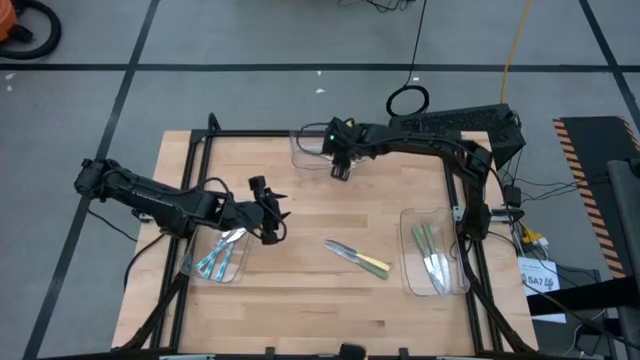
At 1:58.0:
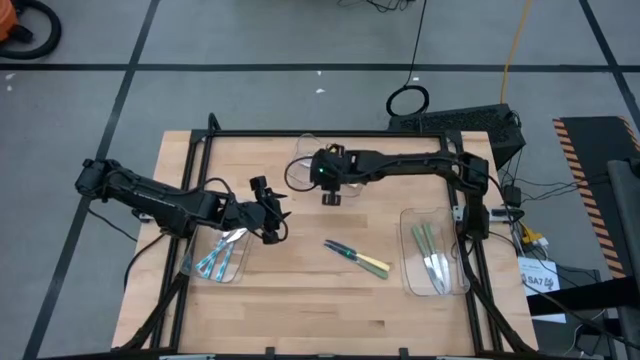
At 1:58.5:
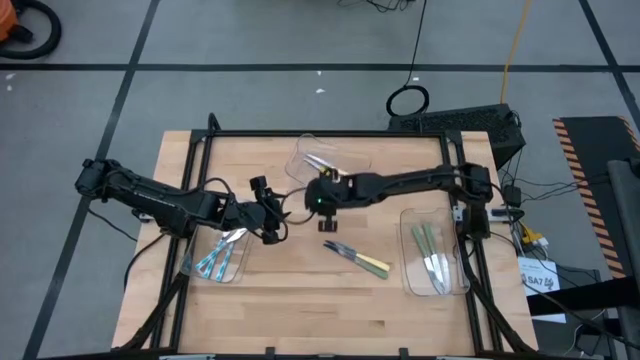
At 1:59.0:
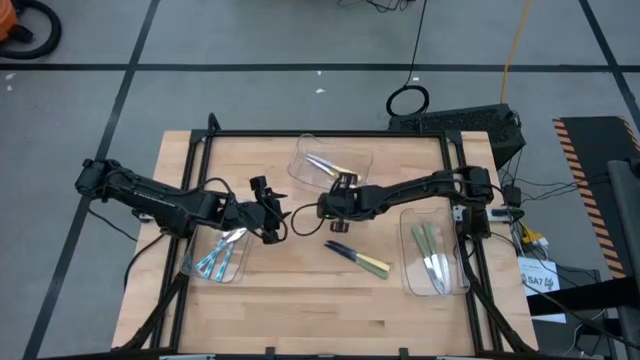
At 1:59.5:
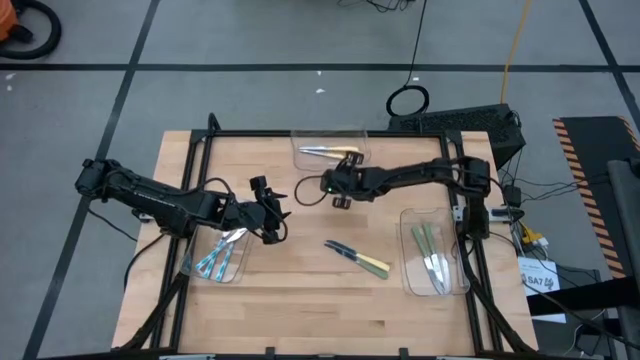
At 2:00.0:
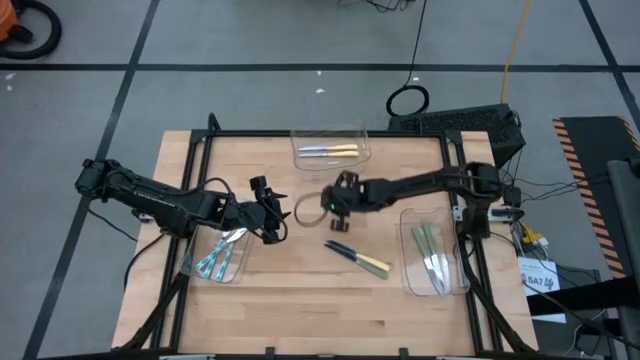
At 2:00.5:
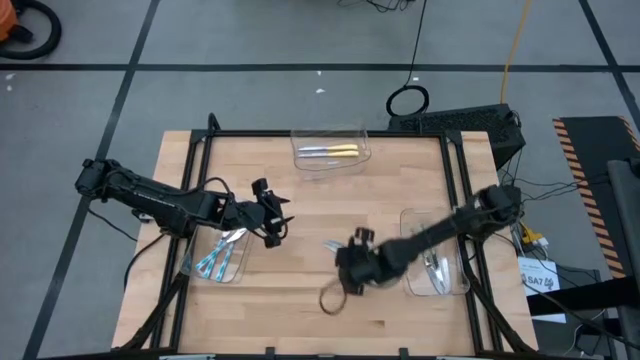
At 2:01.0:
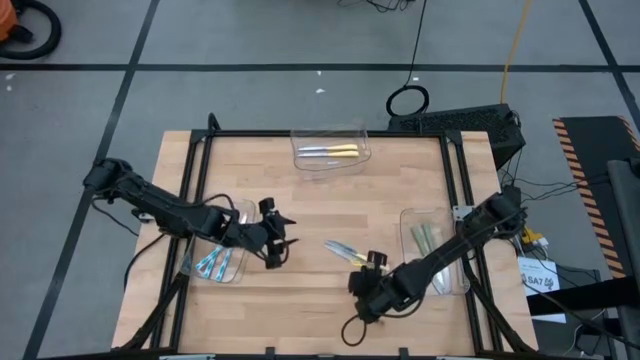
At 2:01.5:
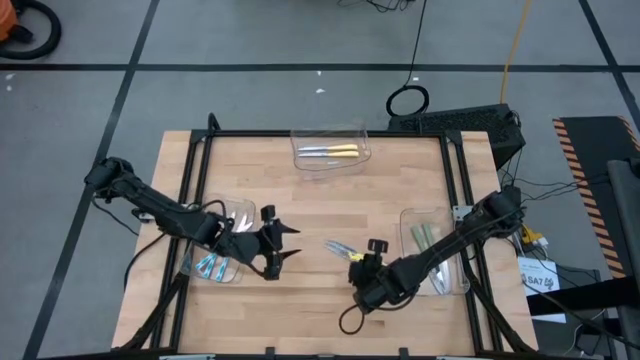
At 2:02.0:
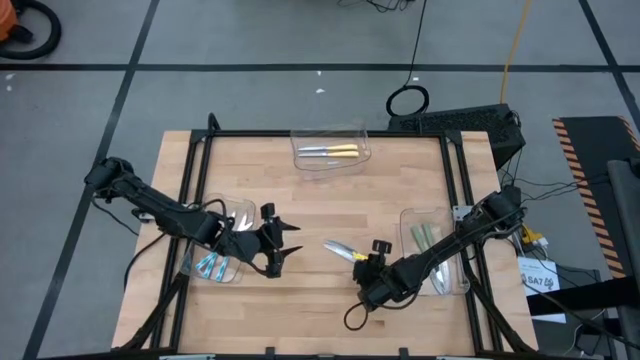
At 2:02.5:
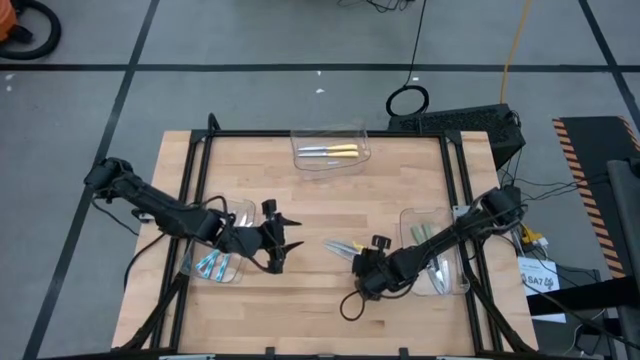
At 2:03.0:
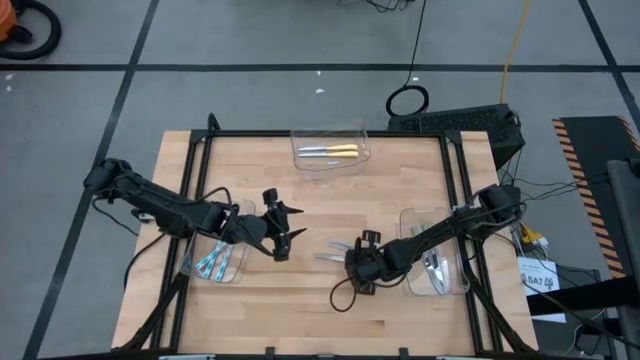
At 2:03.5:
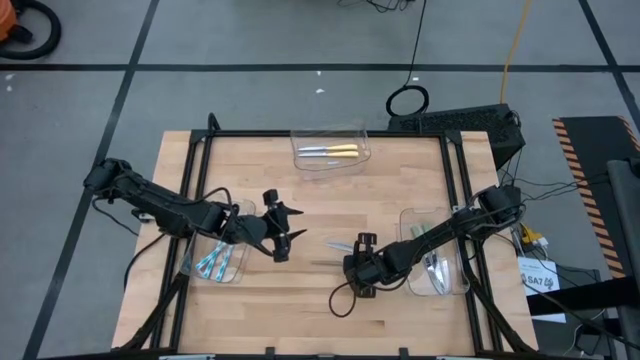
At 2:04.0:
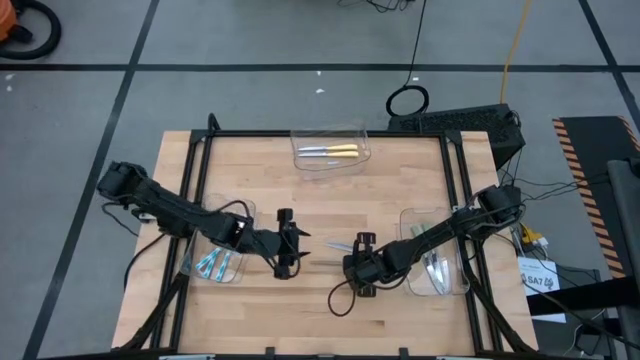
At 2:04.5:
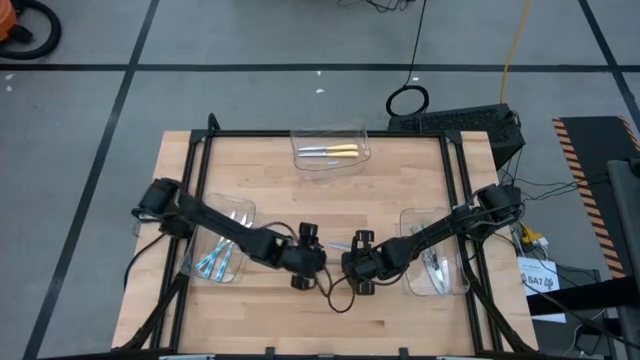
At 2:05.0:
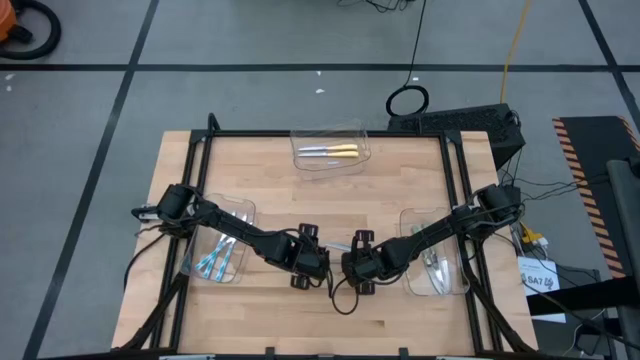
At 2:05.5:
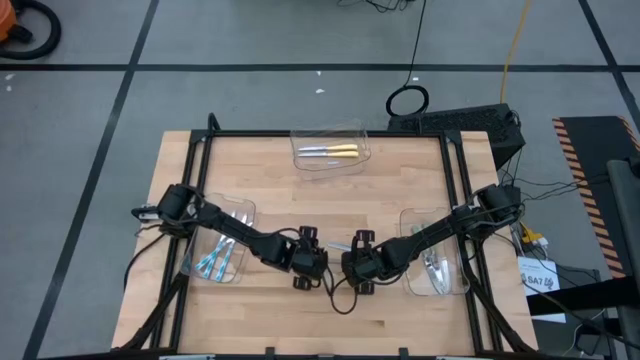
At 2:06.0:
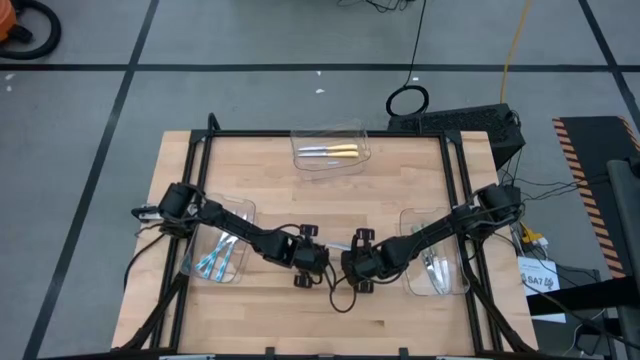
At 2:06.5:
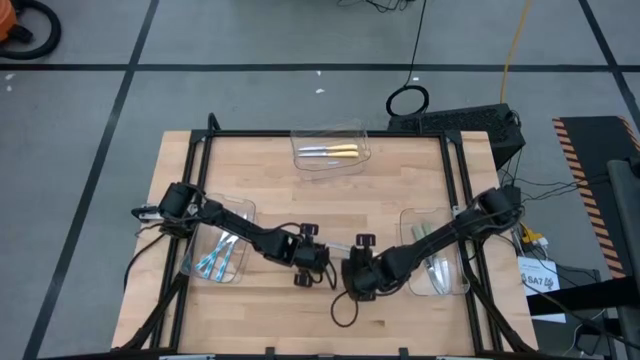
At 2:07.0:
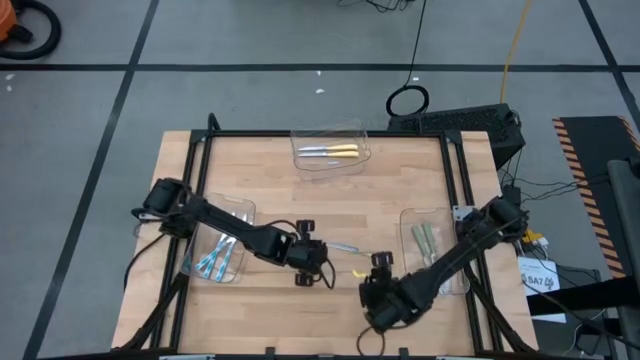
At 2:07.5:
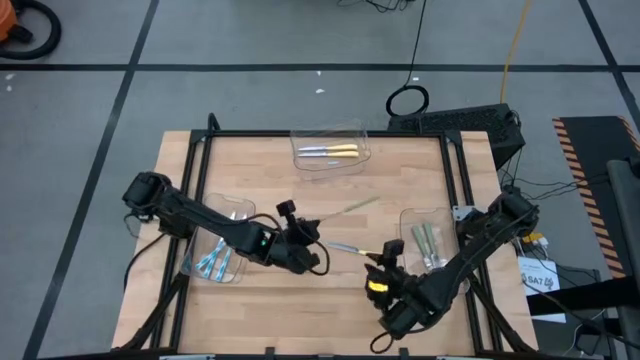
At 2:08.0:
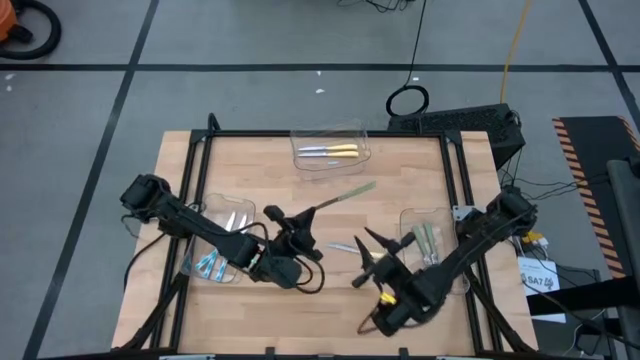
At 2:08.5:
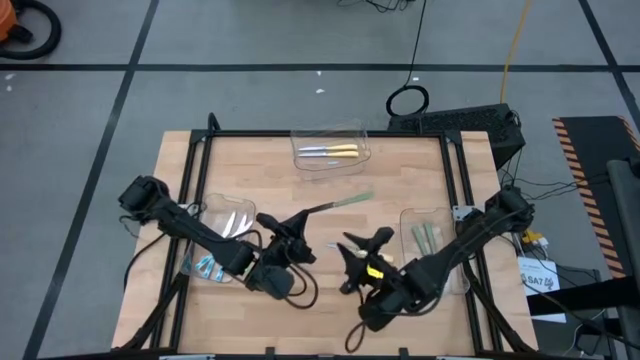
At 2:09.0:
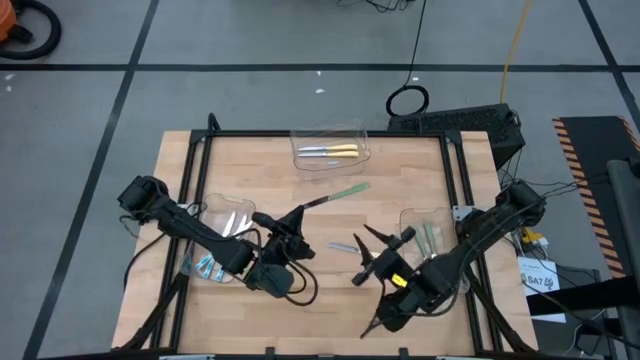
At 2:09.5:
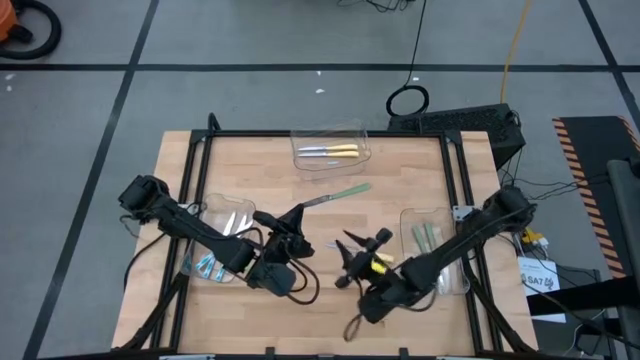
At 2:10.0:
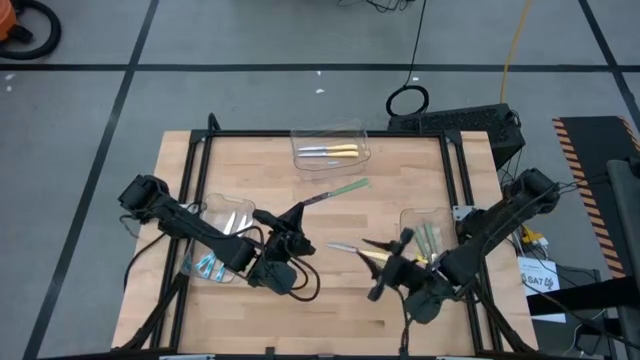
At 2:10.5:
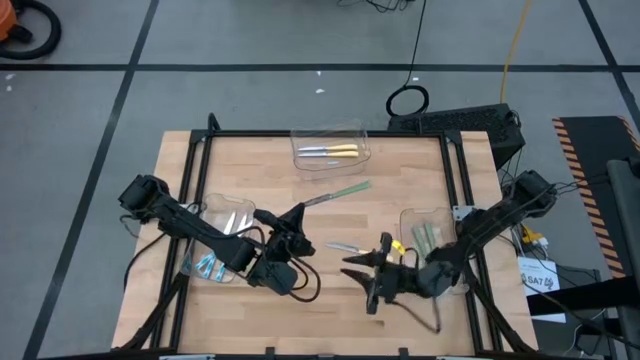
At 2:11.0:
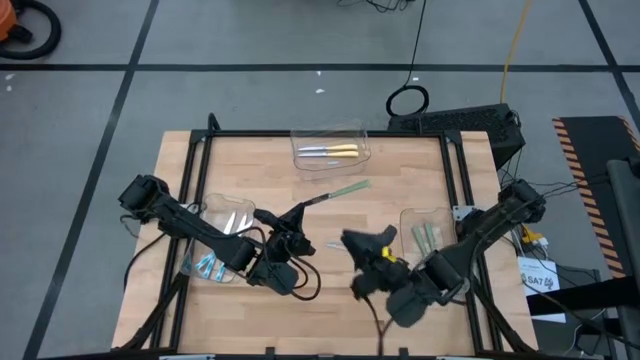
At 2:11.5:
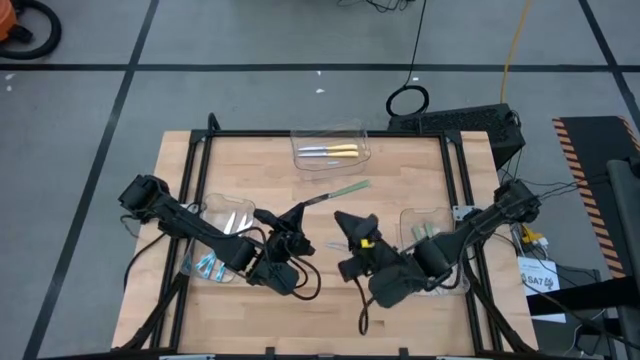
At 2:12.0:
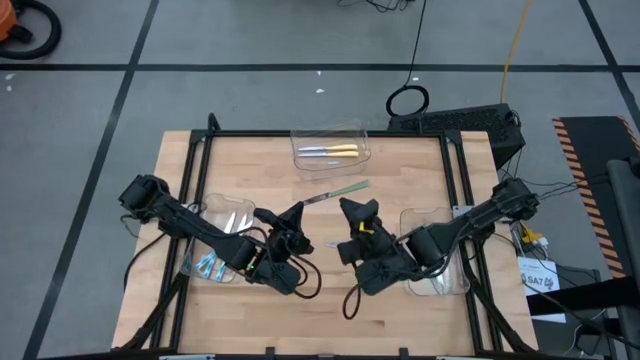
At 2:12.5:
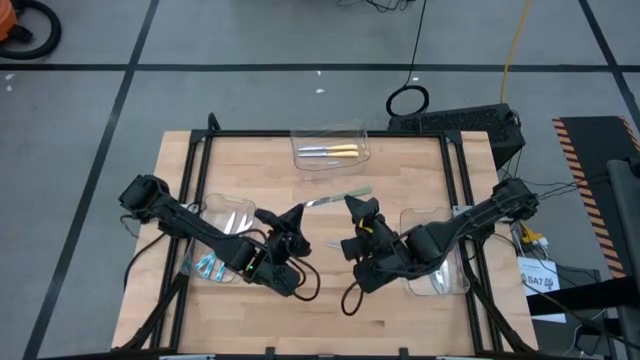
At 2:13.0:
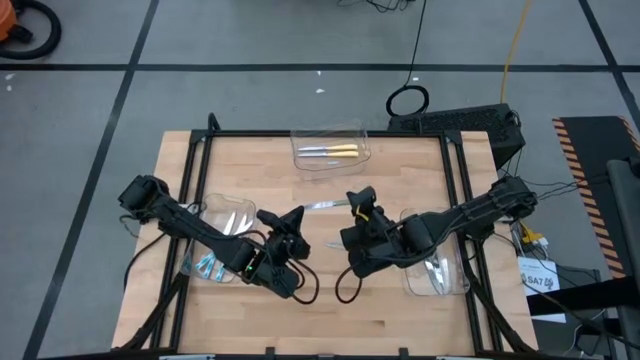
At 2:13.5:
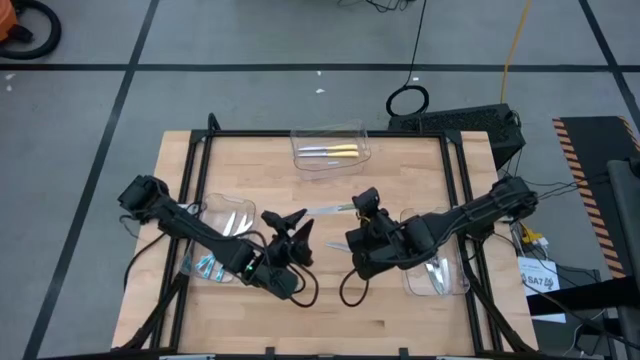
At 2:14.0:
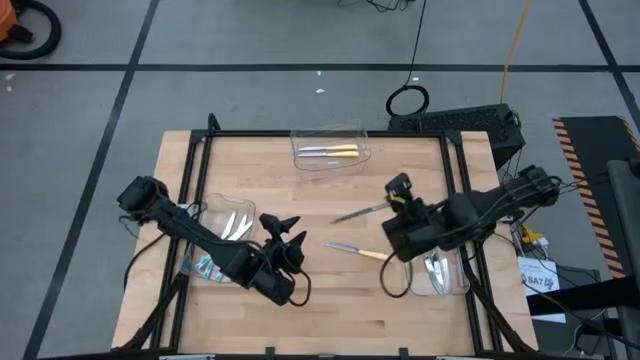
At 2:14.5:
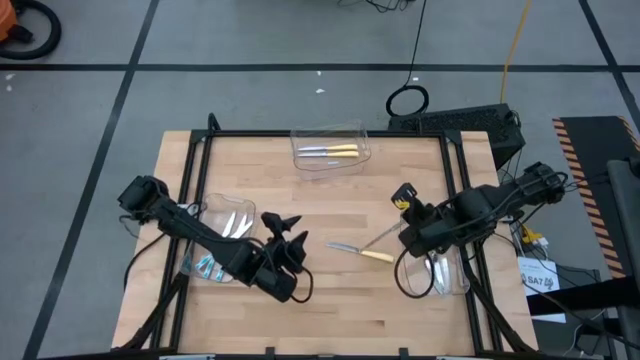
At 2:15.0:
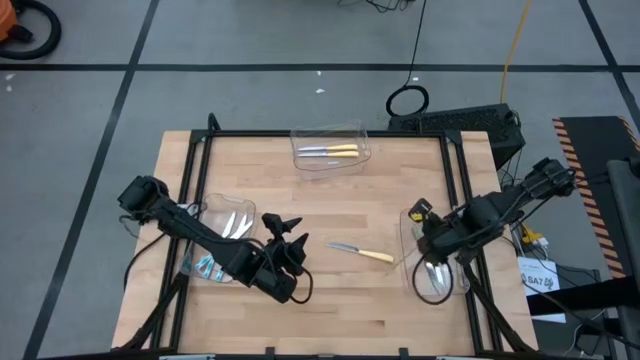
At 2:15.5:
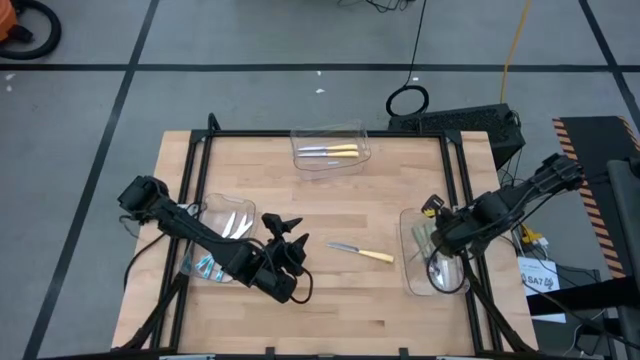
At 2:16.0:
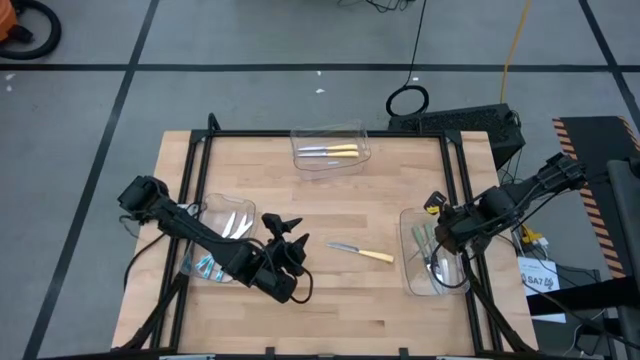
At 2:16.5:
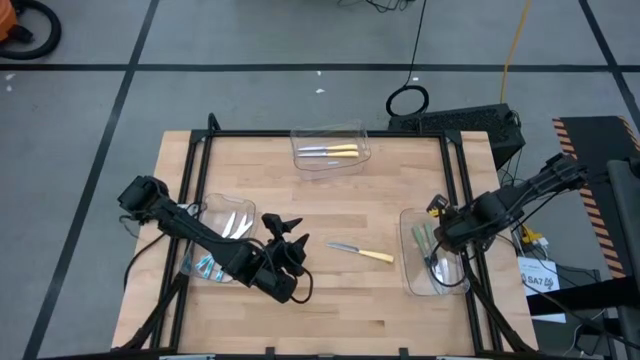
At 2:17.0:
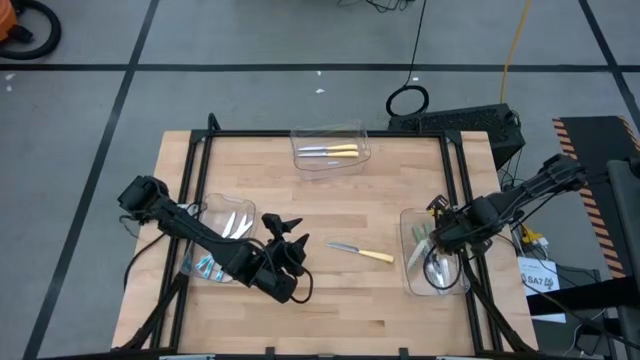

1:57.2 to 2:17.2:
Task: Sort silverware by color (type)
Put the green knife into the bottom right transparent bin

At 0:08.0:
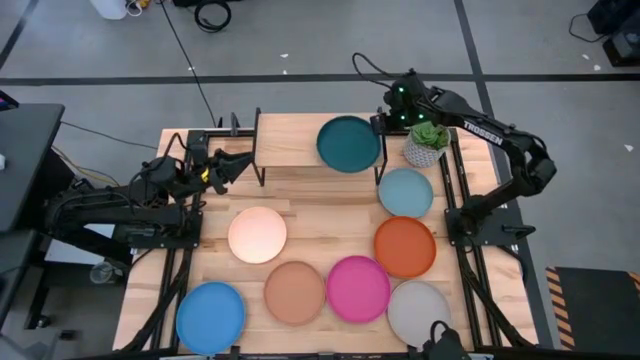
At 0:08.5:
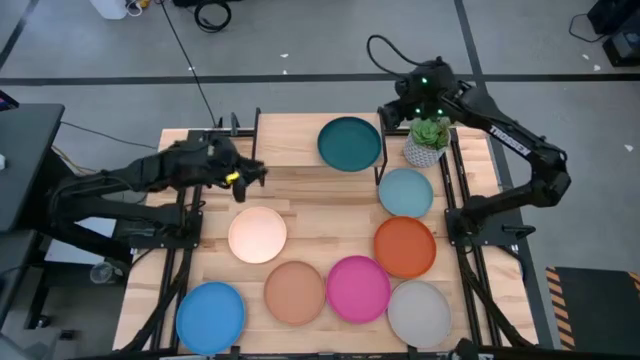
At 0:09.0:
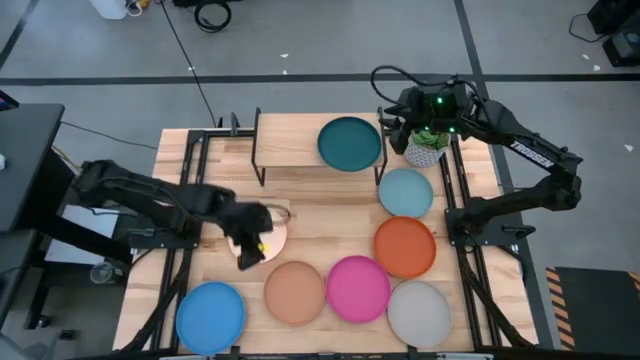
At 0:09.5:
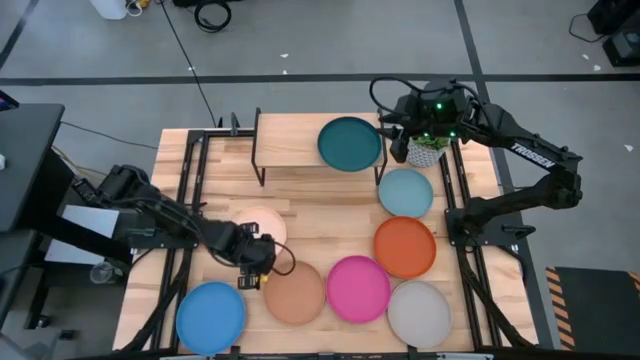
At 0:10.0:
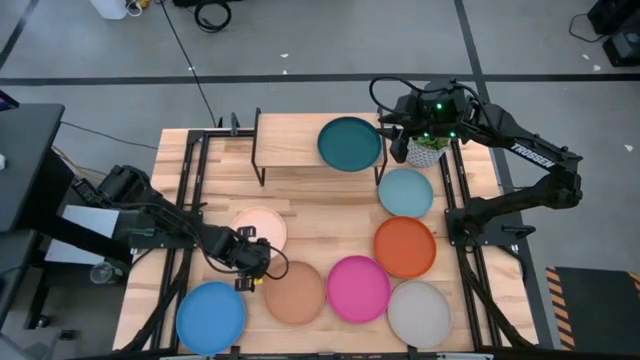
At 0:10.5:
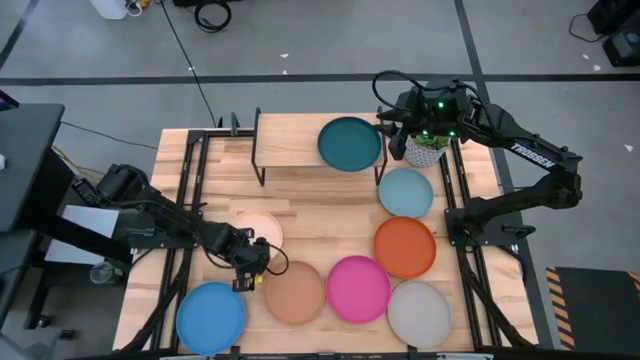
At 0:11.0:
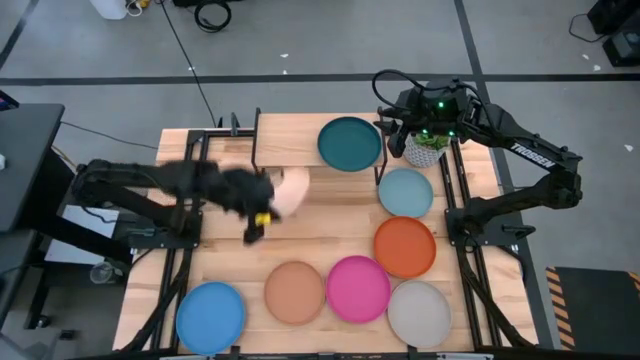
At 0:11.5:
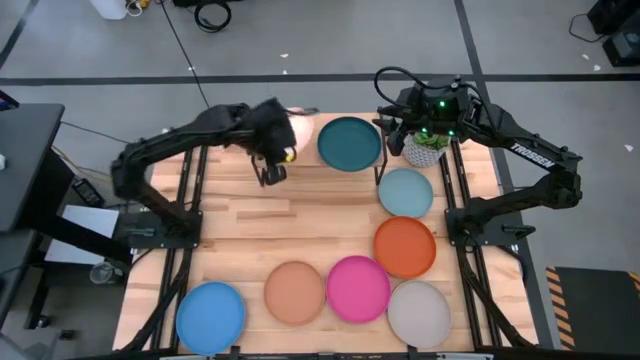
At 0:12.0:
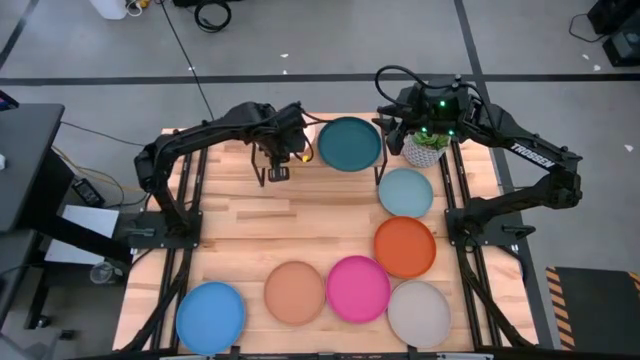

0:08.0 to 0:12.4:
Task: Place and stack plates onto a shelf
Put the light pink plate on the shelf
